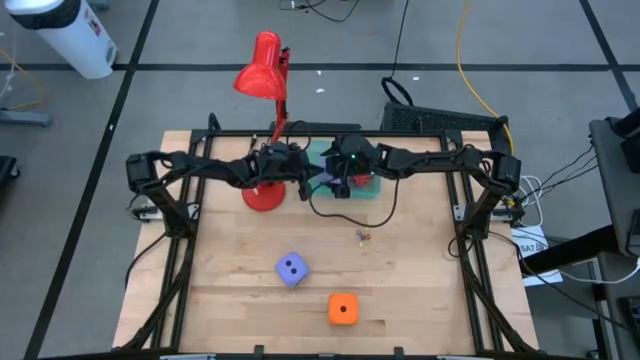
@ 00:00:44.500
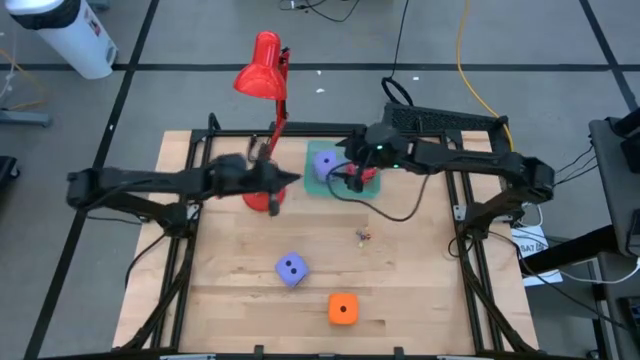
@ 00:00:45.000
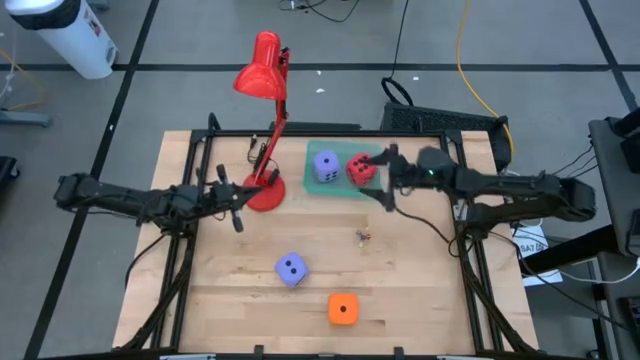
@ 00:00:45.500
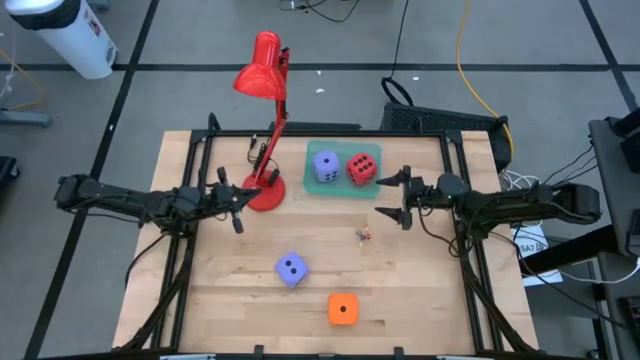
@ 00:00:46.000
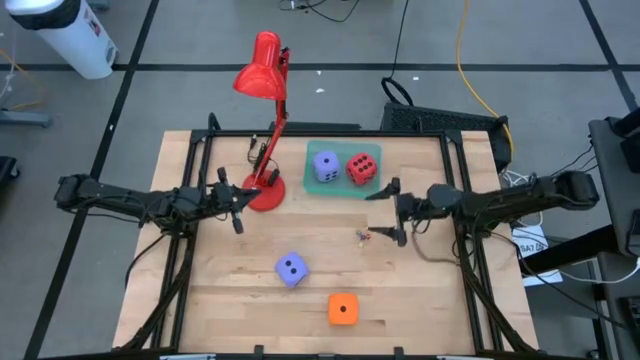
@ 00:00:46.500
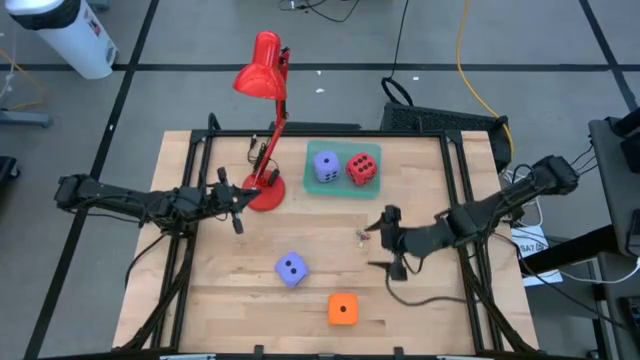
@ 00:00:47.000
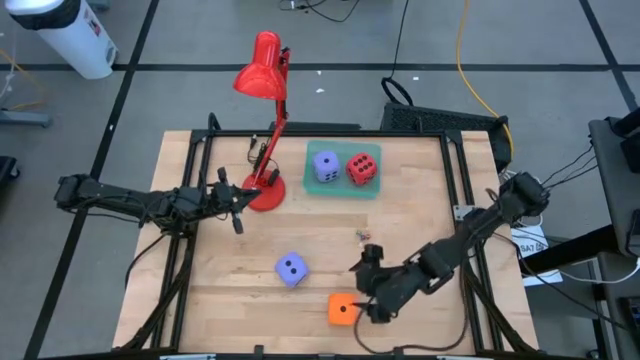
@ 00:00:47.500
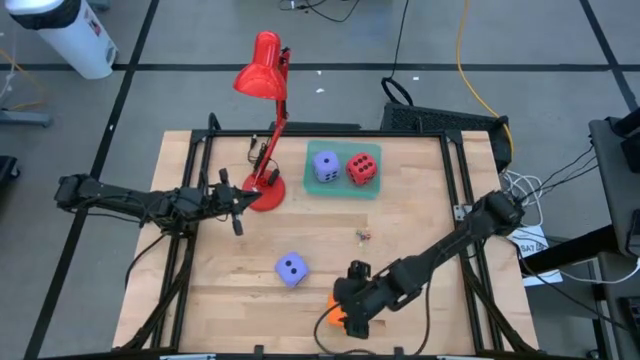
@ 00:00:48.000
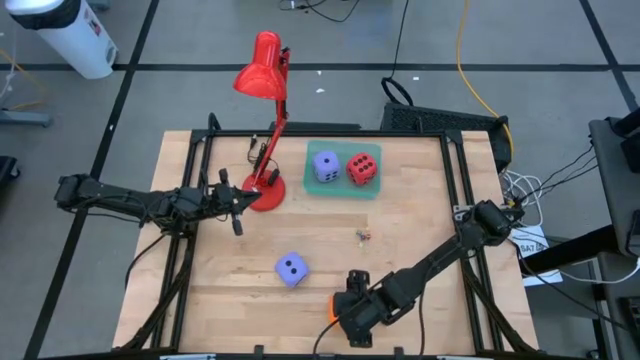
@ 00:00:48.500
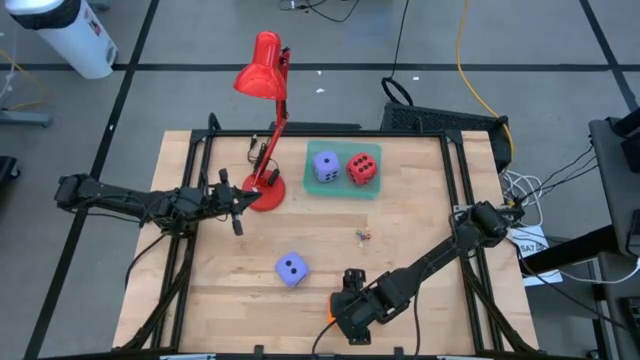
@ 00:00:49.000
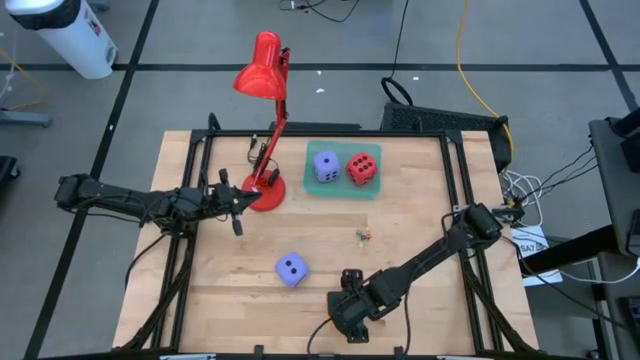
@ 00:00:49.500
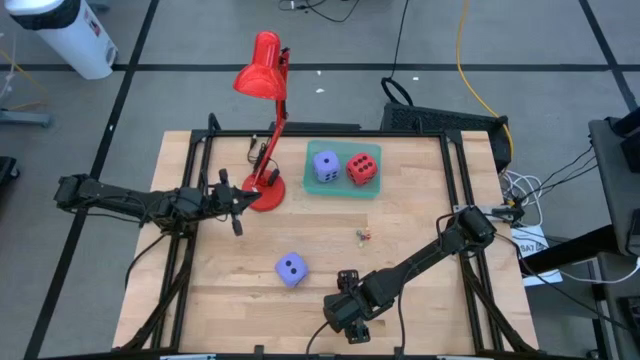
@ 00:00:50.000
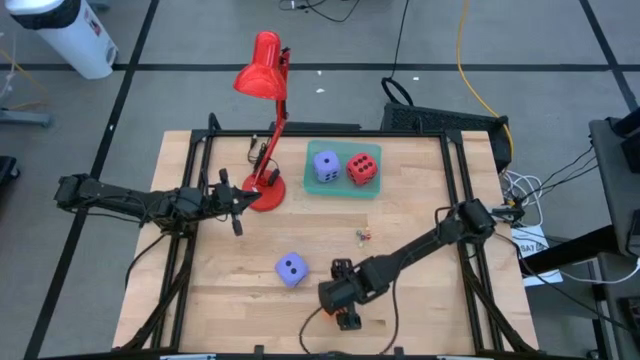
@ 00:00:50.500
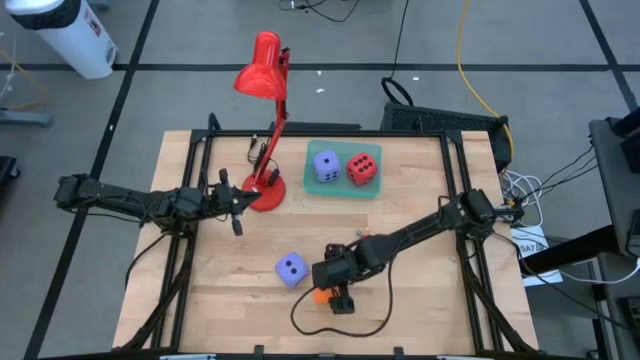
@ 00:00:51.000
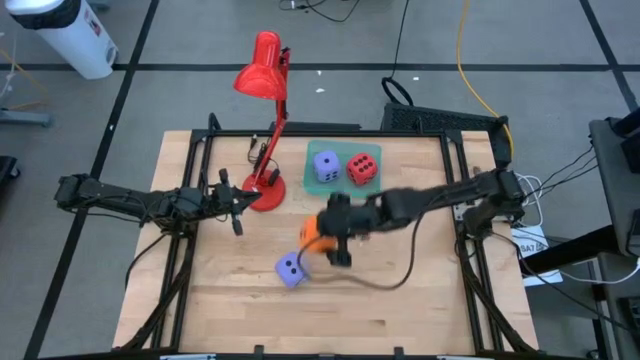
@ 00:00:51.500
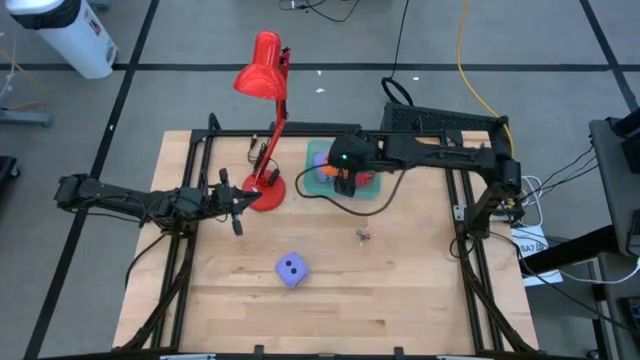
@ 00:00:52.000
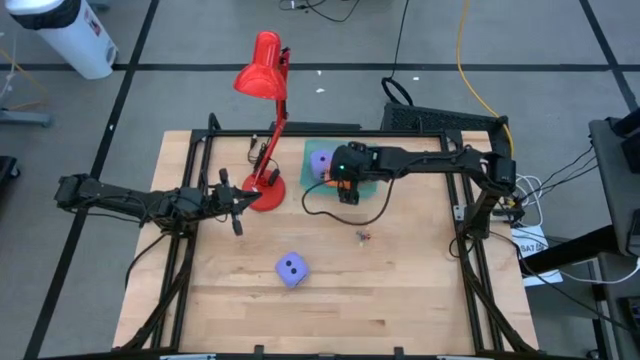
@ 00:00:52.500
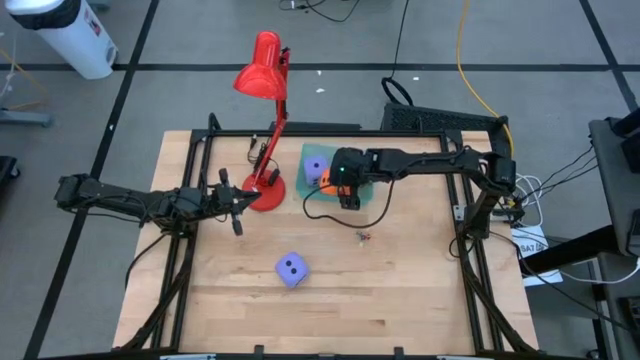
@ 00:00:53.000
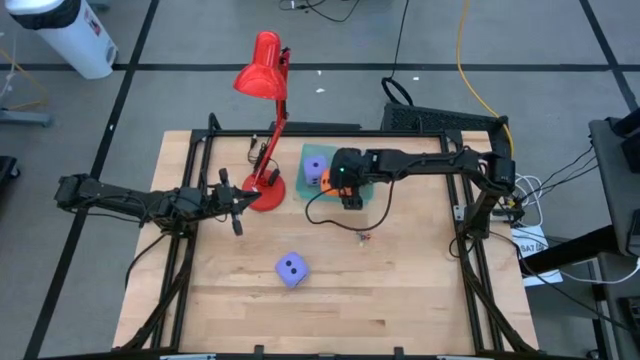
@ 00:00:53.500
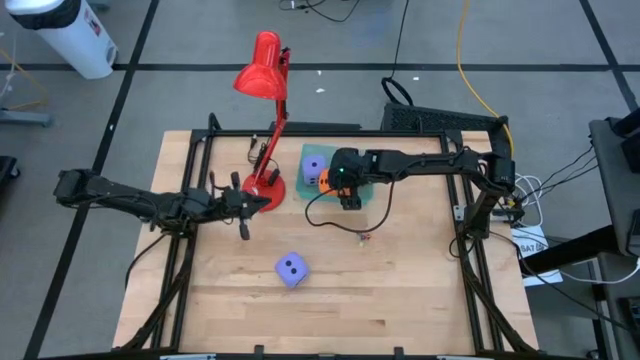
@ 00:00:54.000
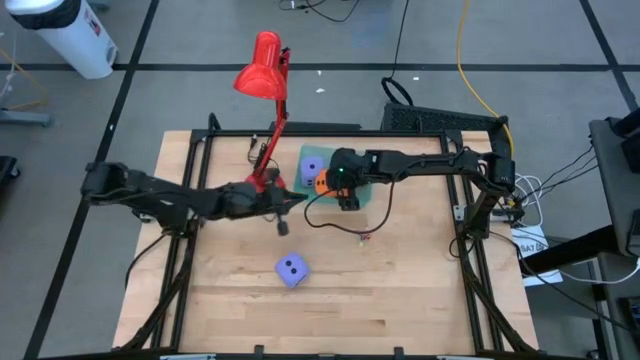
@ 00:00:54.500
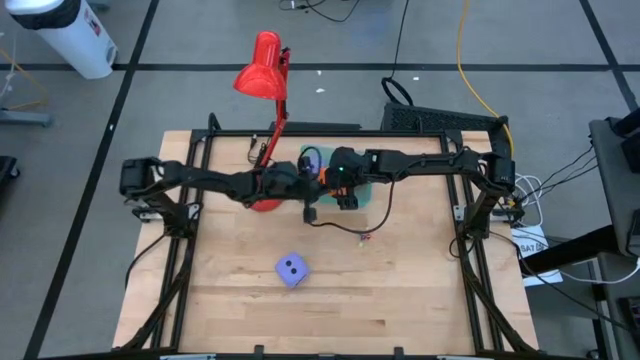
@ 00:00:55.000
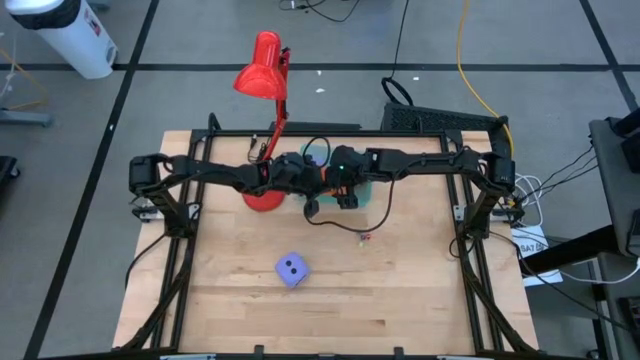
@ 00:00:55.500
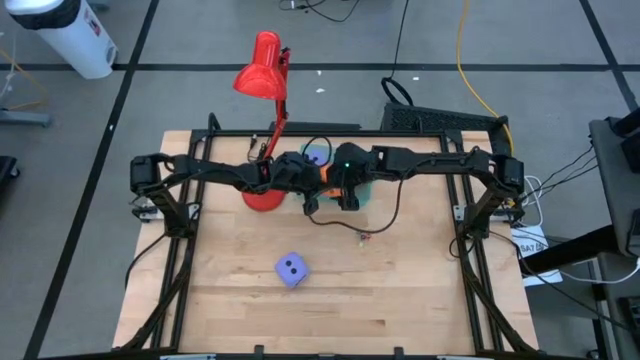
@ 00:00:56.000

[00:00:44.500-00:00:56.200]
Task: Pick & Place Dice
Put the orange die into the green bin

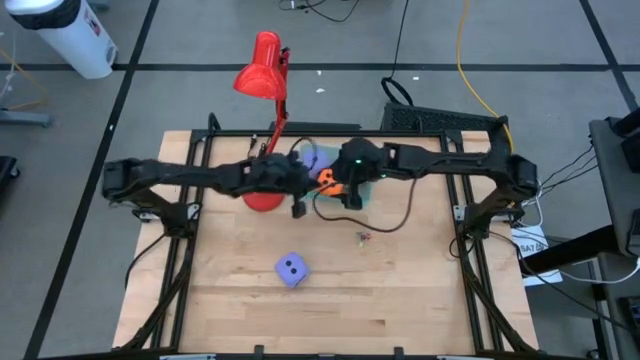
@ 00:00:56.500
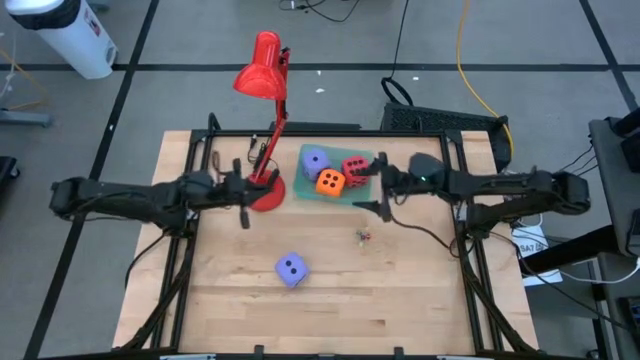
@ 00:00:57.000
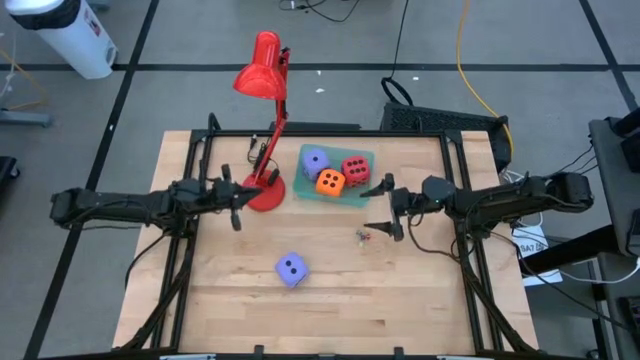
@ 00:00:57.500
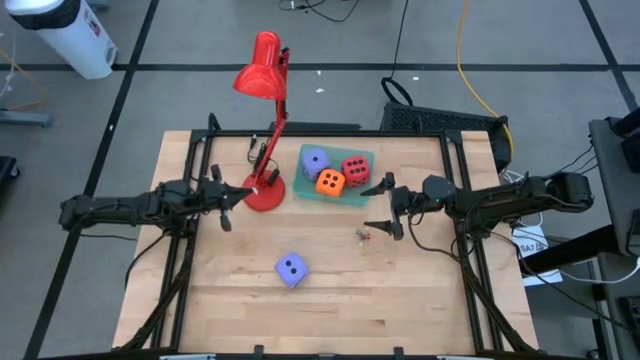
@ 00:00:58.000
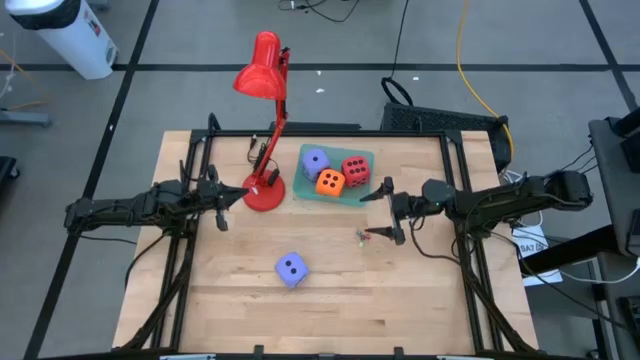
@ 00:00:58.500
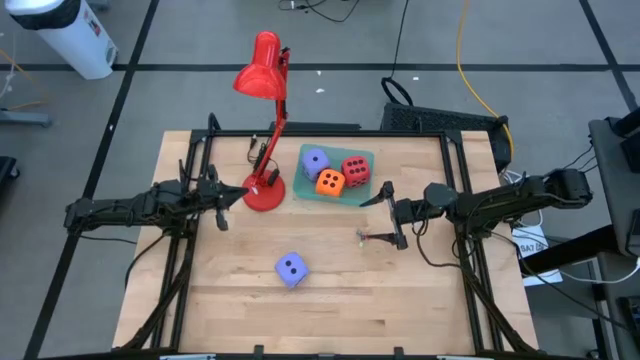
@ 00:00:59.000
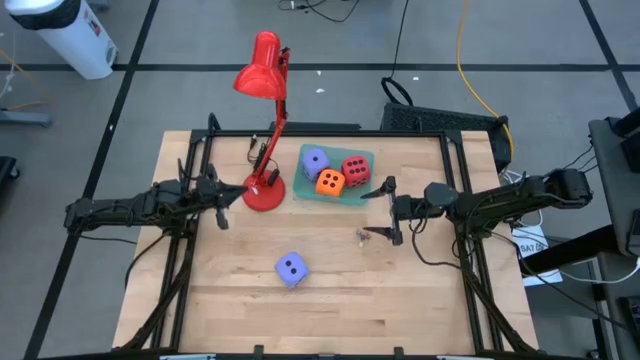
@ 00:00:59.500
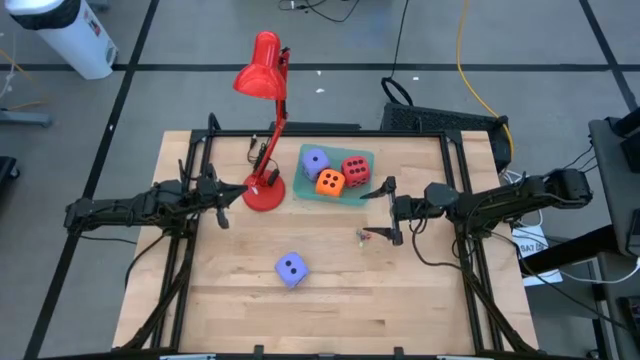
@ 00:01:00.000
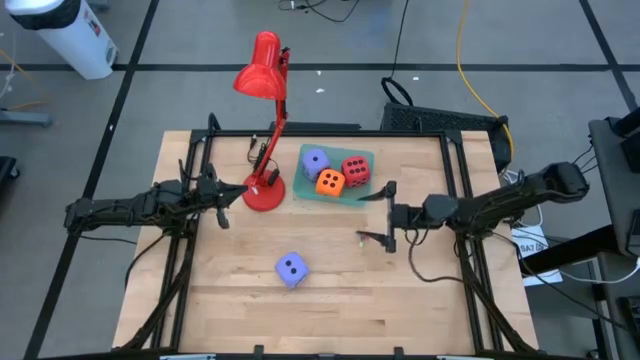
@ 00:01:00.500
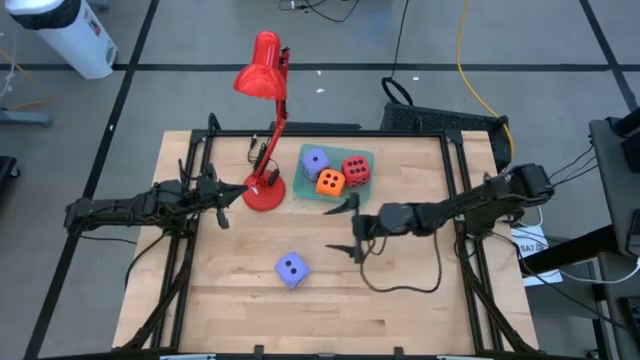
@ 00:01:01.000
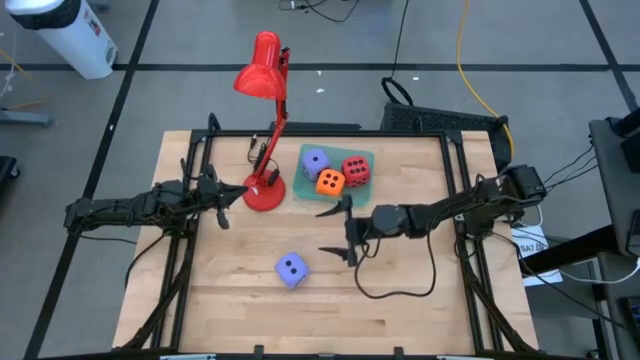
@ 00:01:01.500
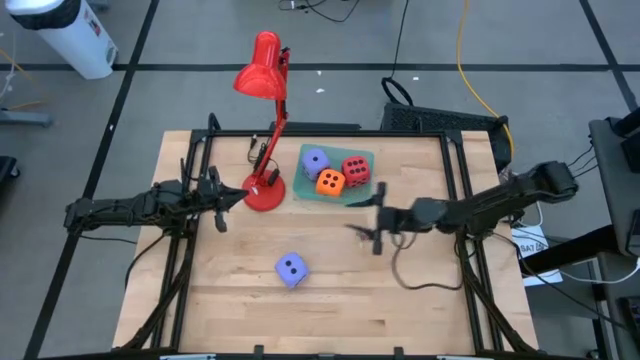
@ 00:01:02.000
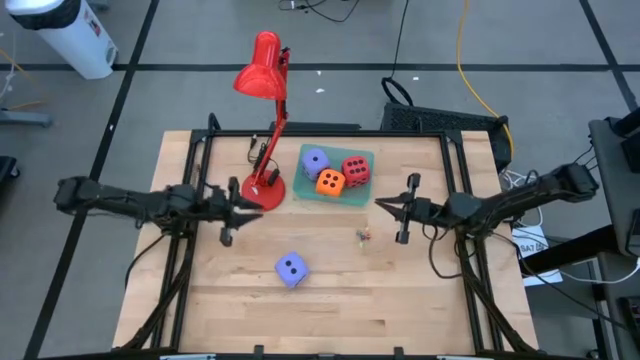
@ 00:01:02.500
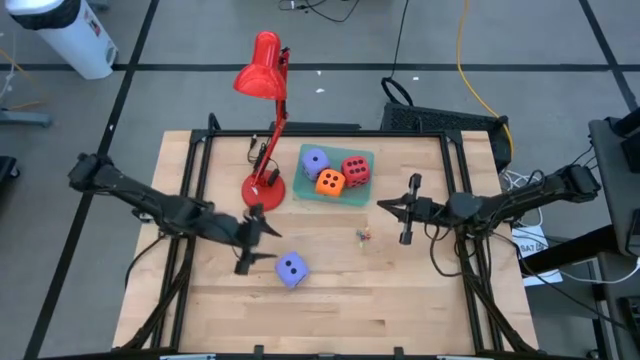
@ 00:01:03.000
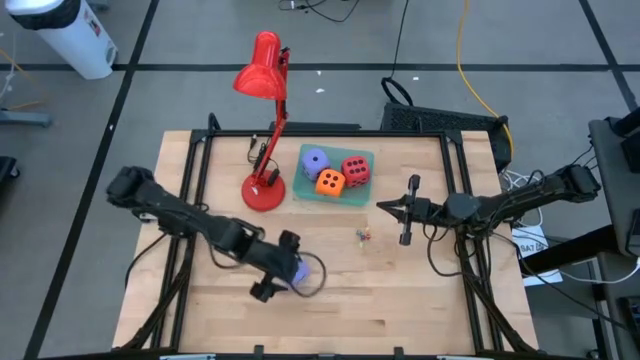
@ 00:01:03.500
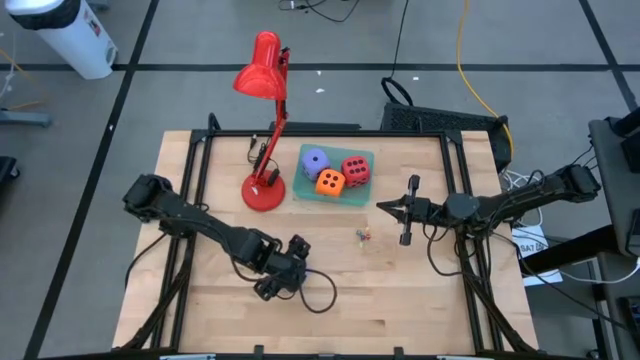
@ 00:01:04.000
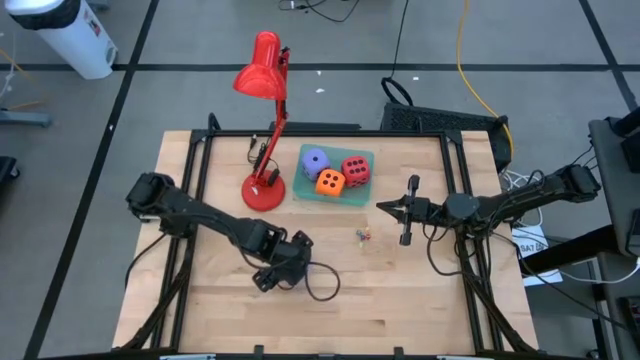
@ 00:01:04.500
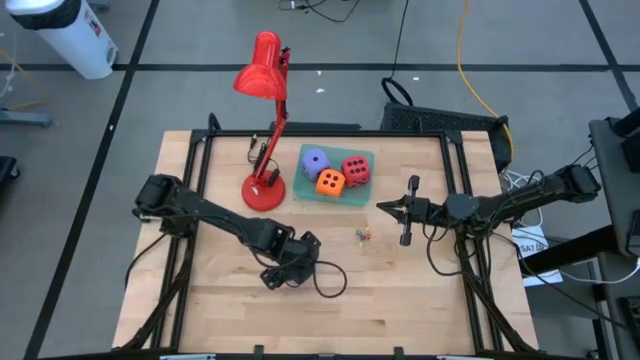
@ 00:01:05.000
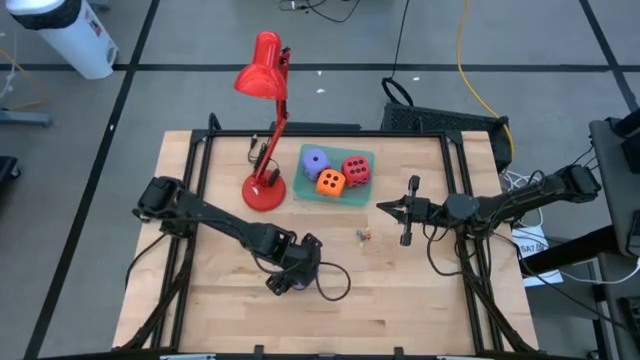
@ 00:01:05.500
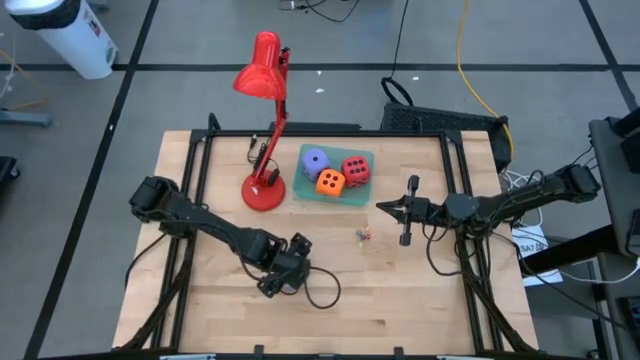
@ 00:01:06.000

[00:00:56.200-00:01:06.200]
Put the light purple die into the green bin
